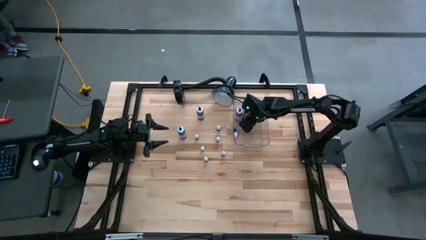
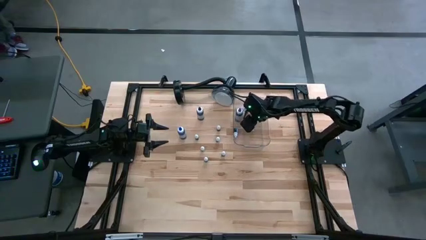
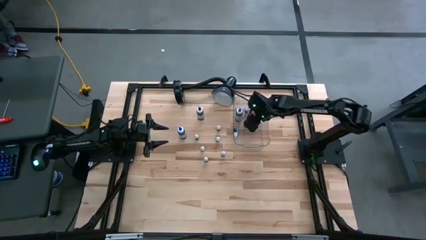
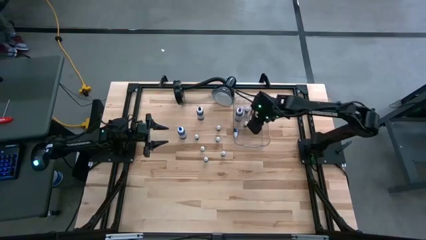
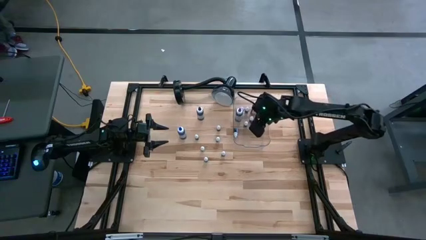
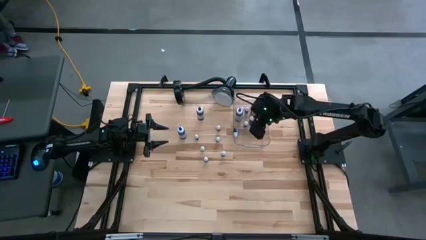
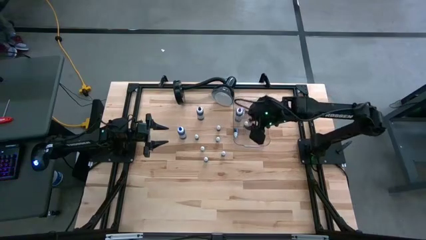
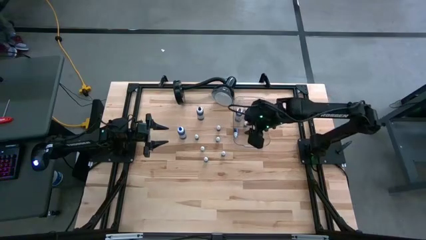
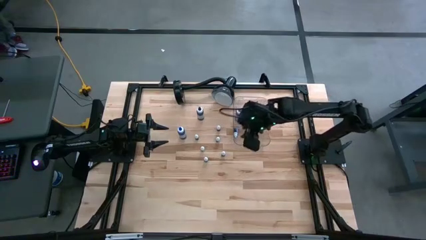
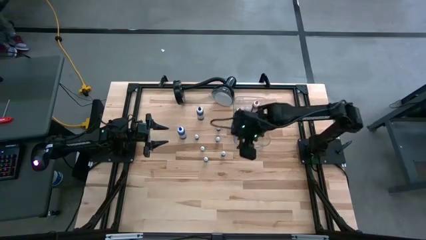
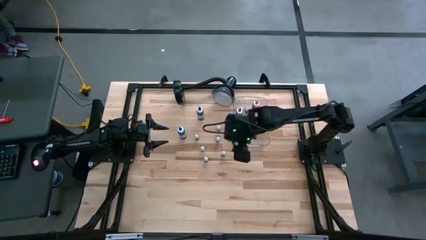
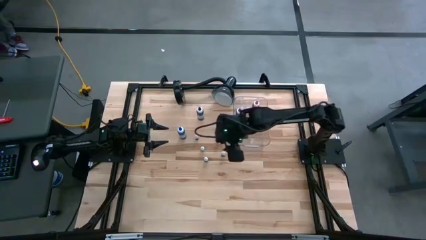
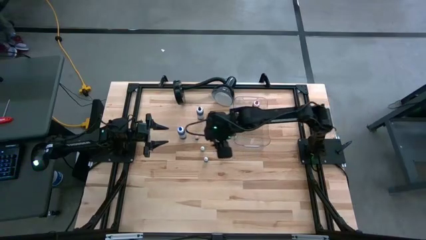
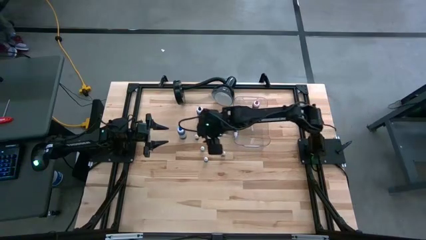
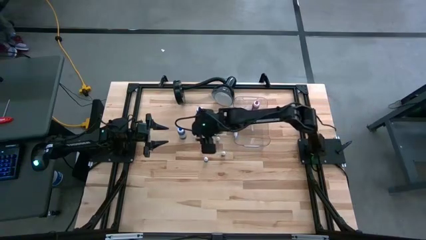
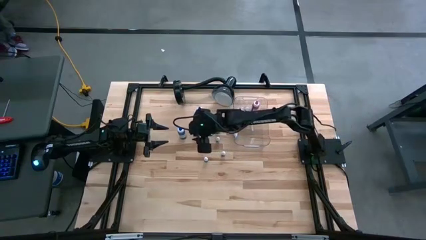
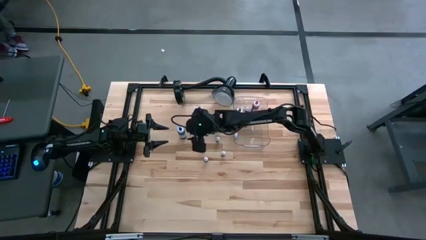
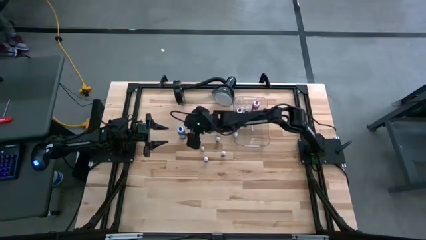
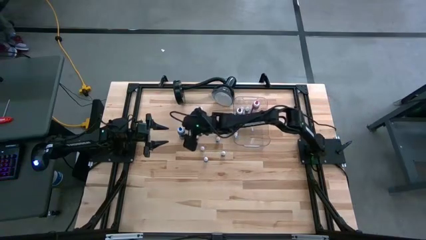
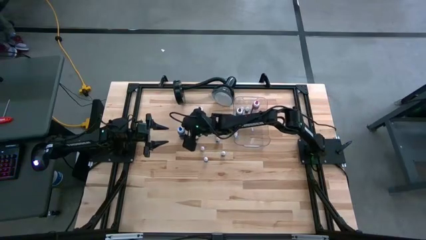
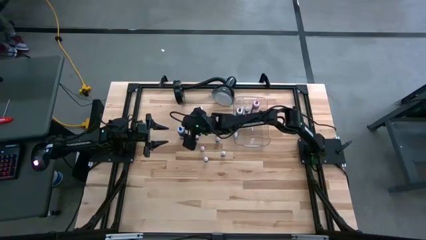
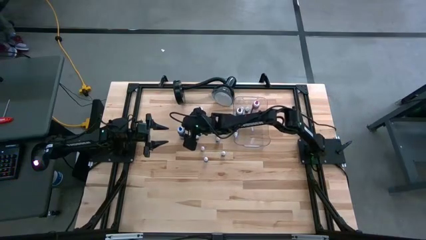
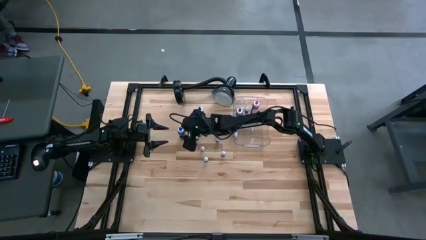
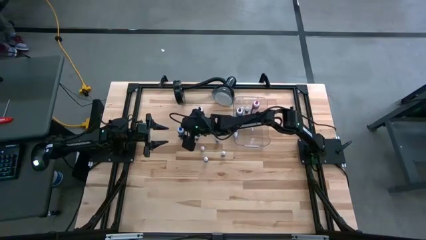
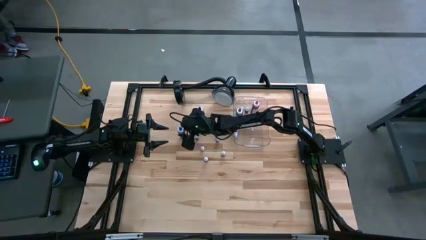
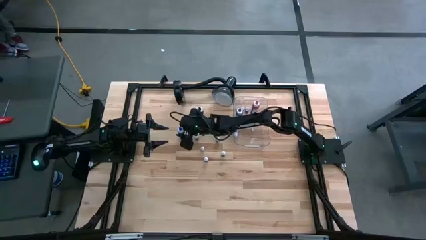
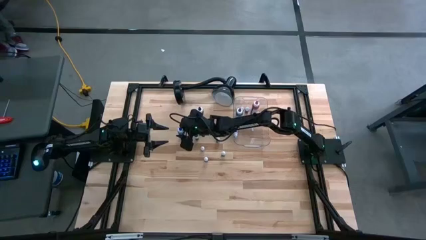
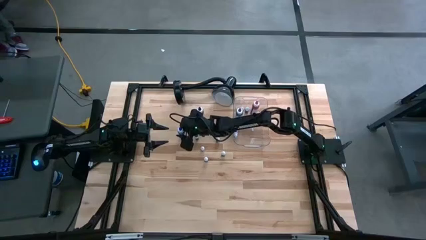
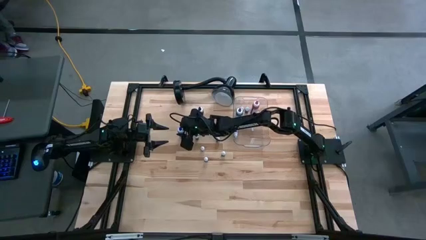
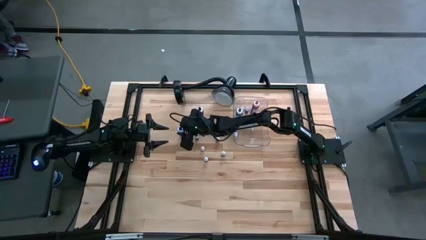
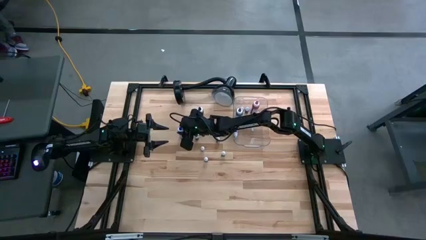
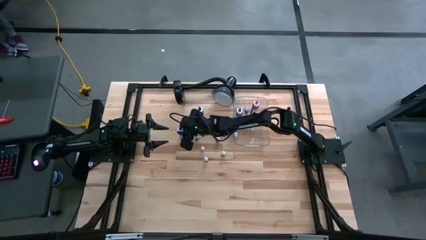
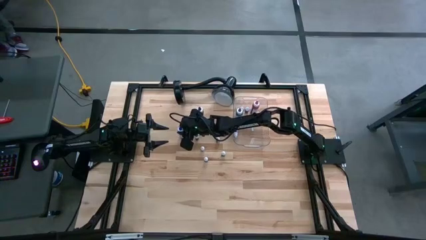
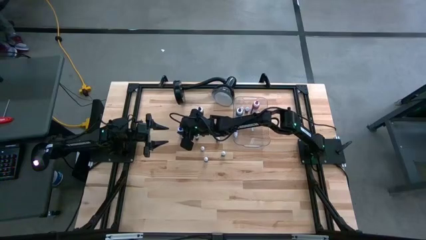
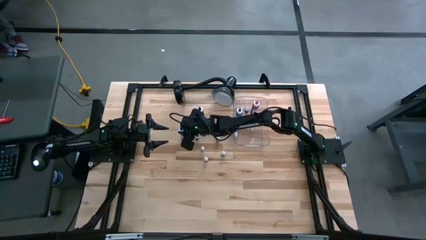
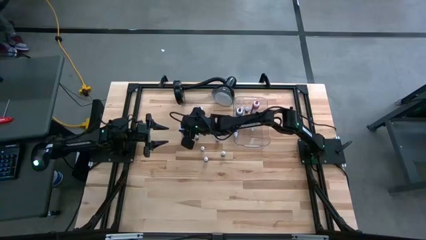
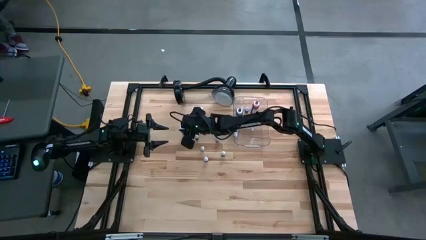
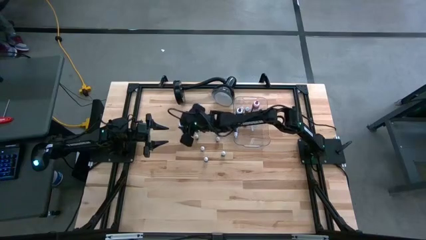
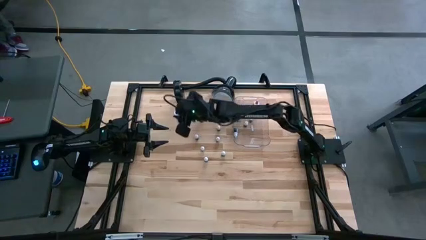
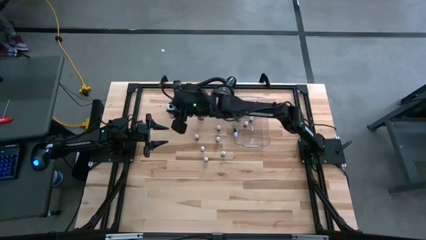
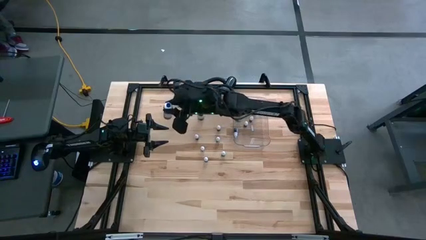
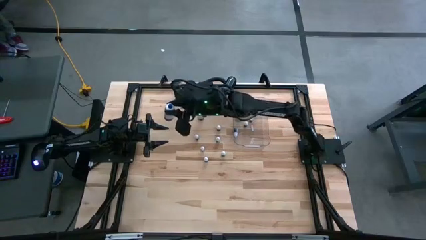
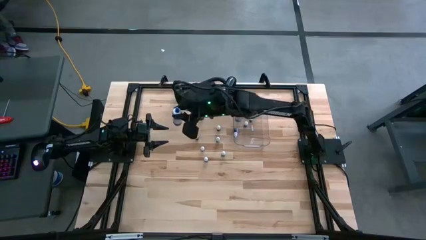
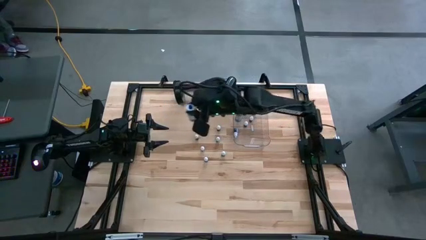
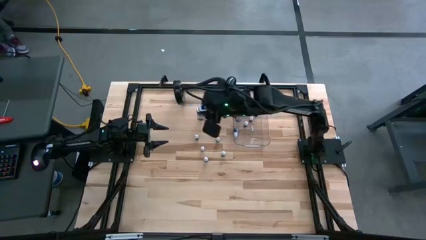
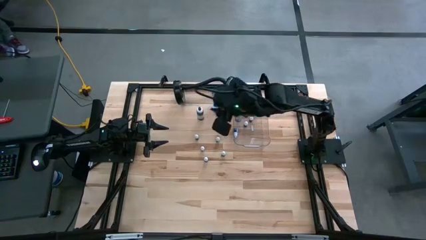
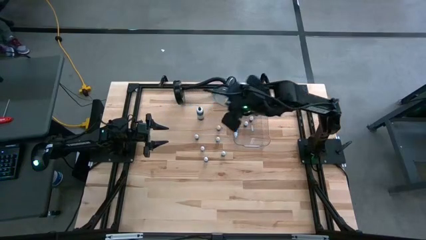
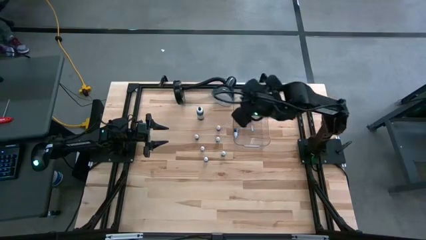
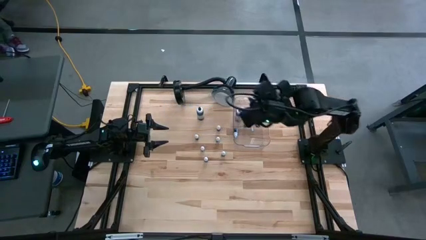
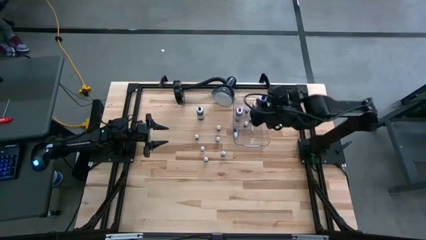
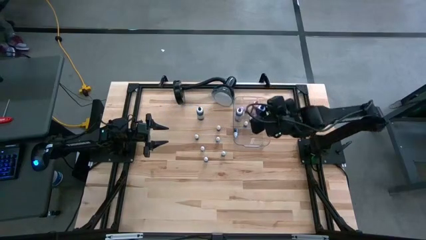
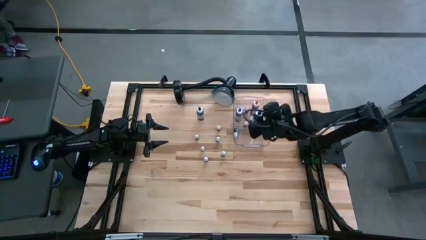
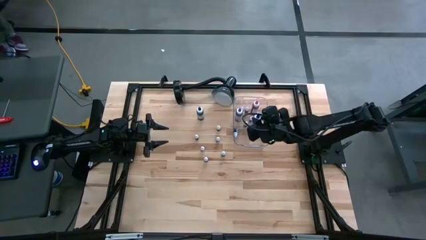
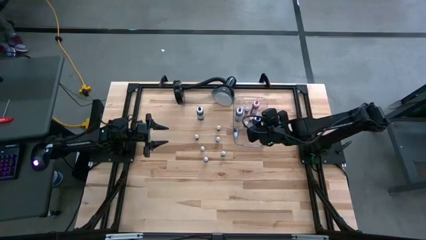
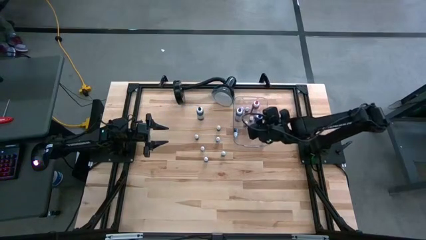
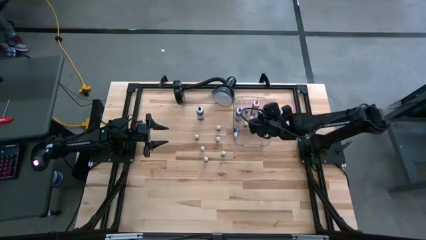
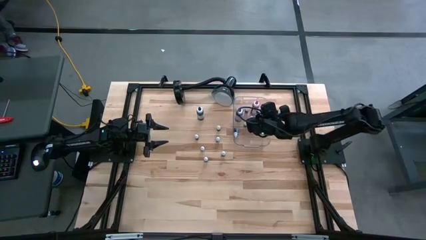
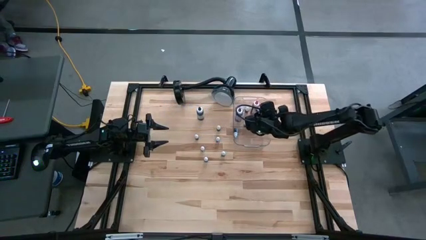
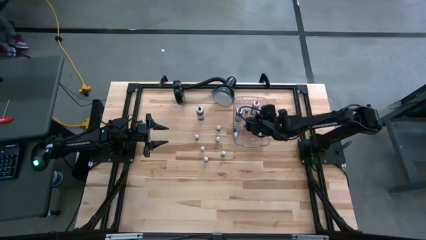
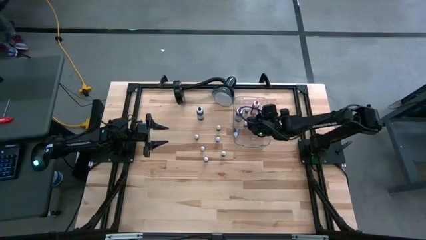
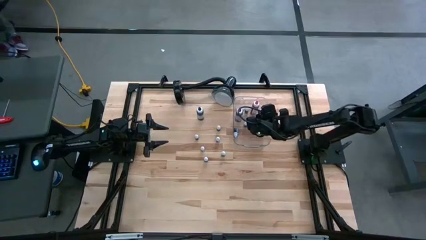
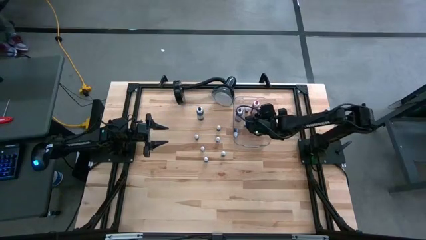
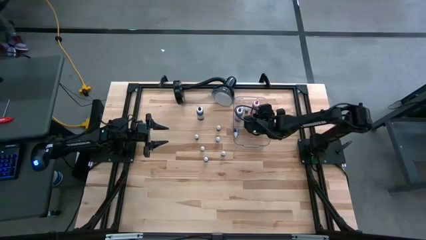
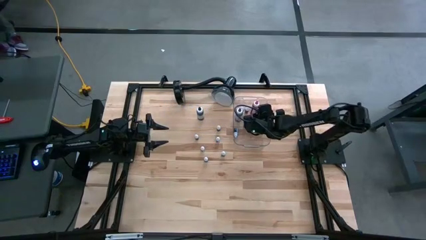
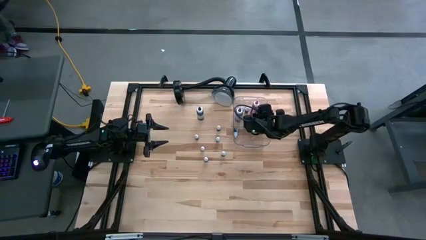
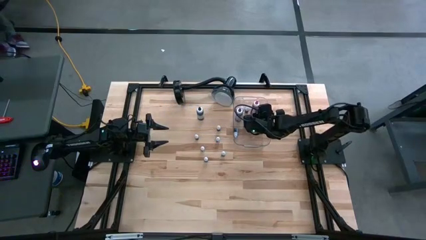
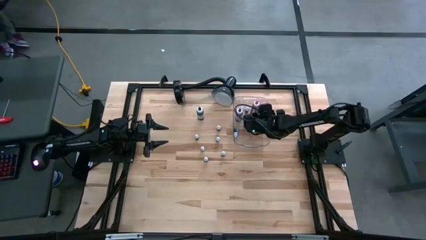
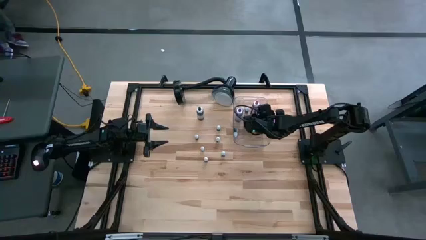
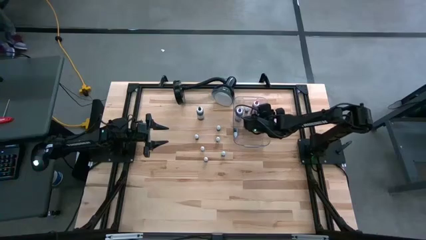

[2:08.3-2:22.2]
Task: Pick & Place food coloring
Put the big blue food coloring bottle into the transparent bin

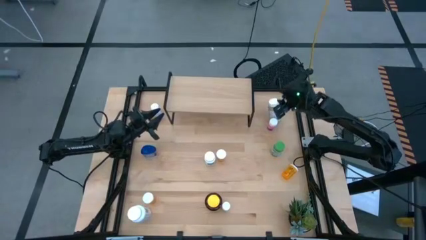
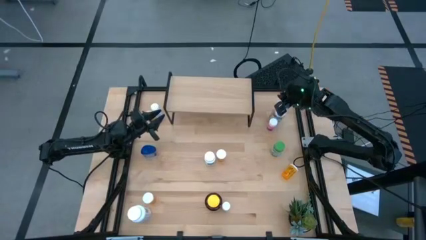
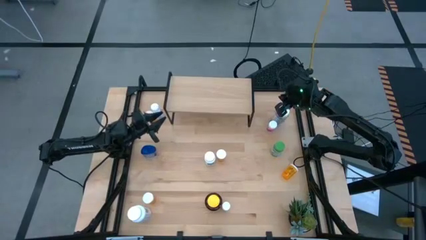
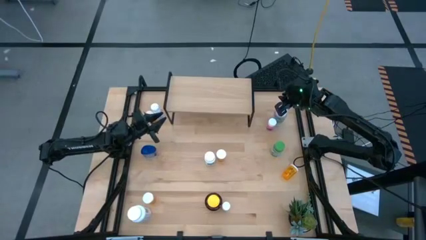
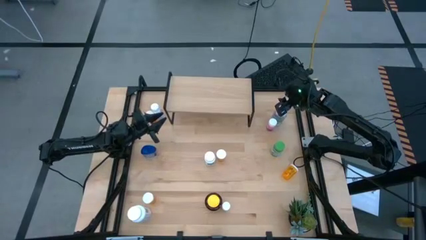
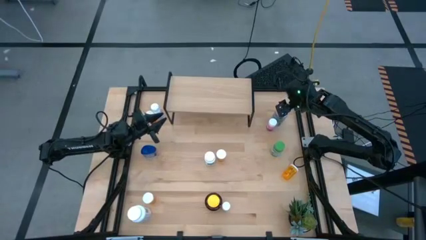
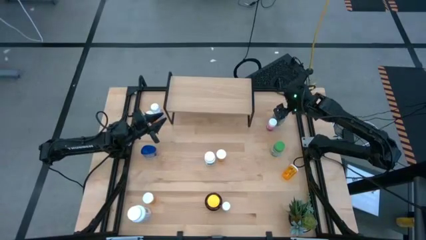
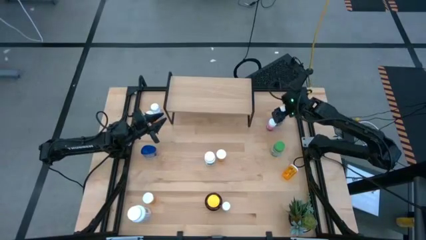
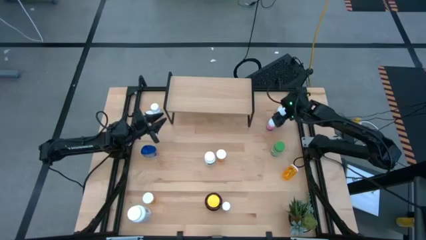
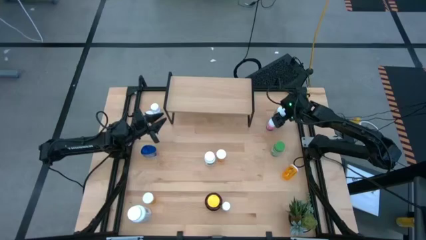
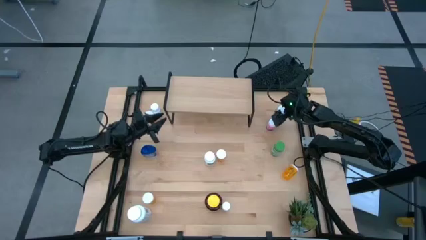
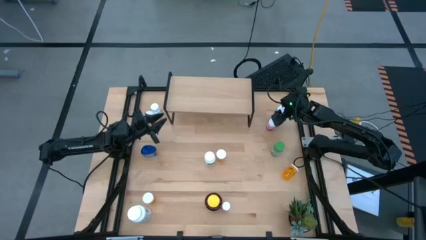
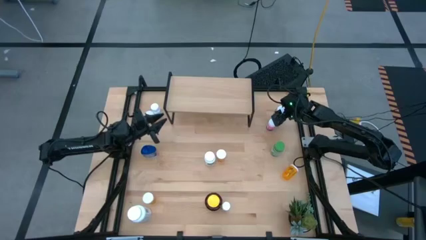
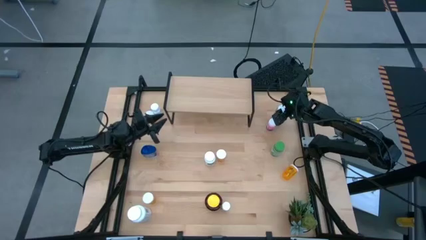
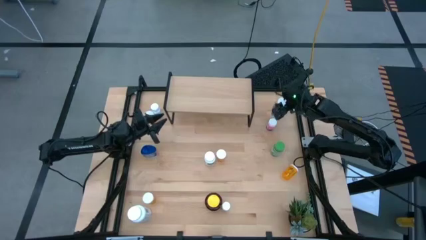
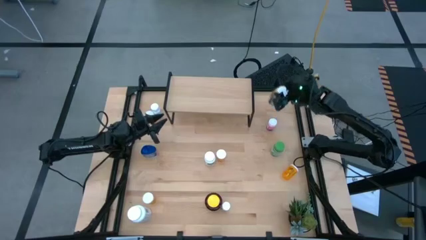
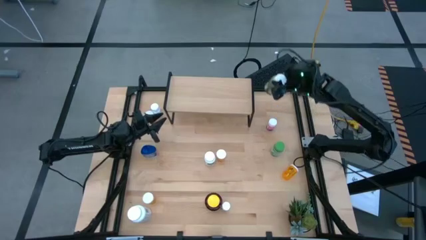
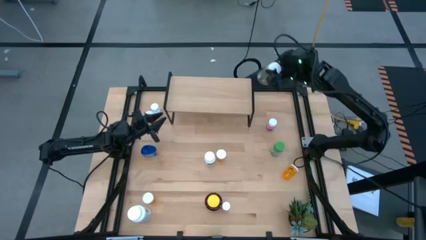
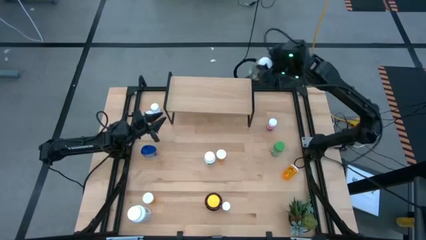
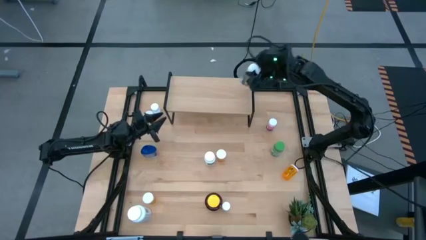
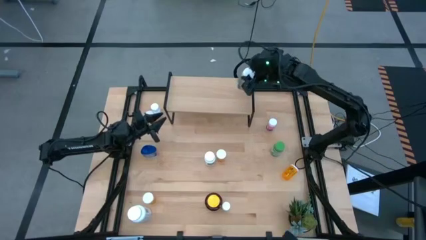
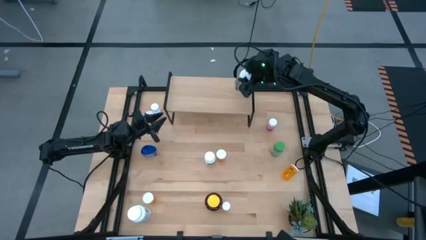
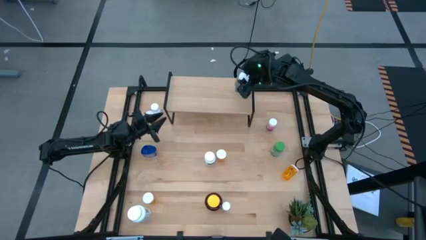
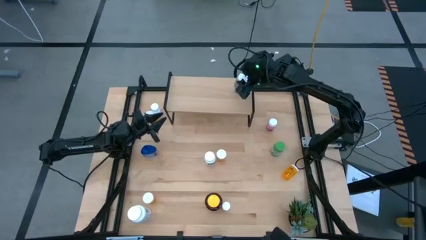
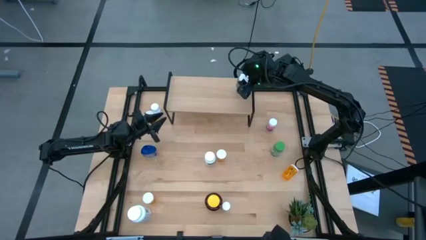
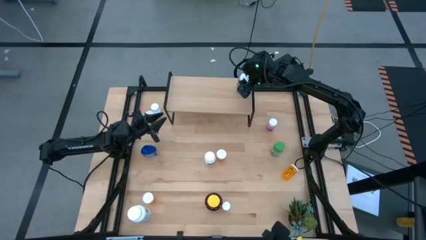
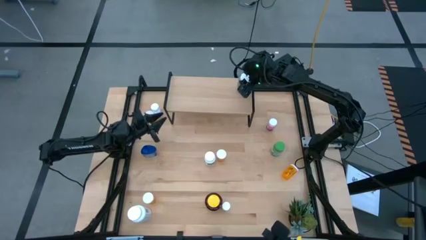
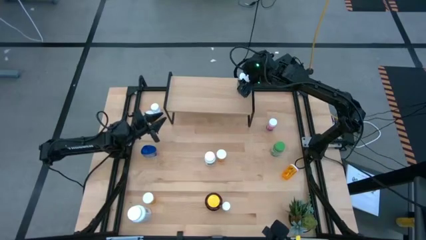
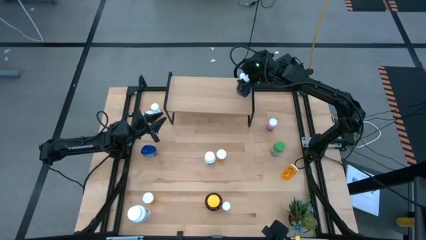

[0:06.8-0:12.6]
Task: Pick and place medicine bottles onto shelf by color
Put the green pill bottle on the shelf
